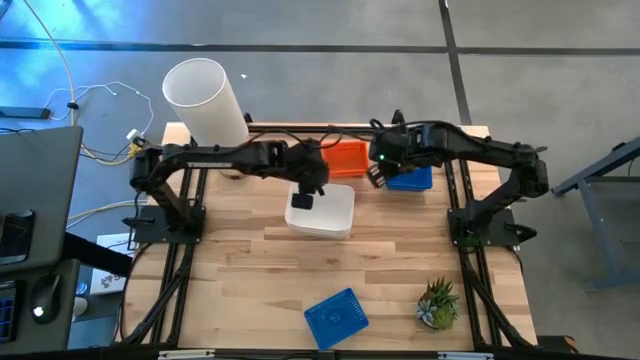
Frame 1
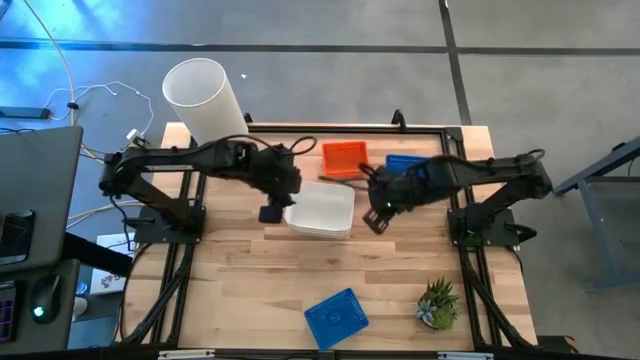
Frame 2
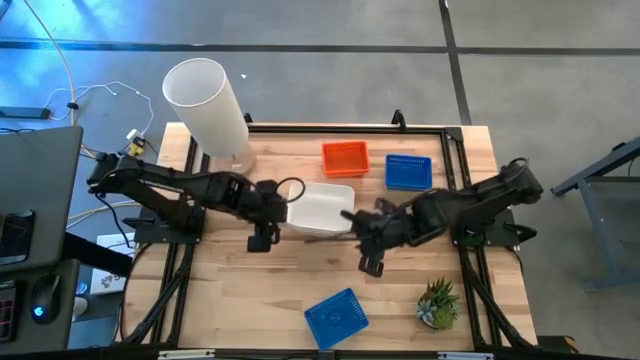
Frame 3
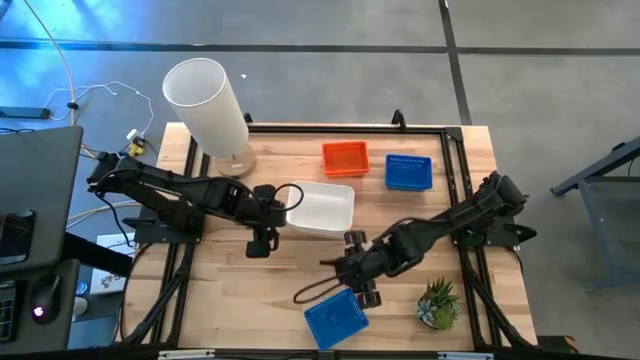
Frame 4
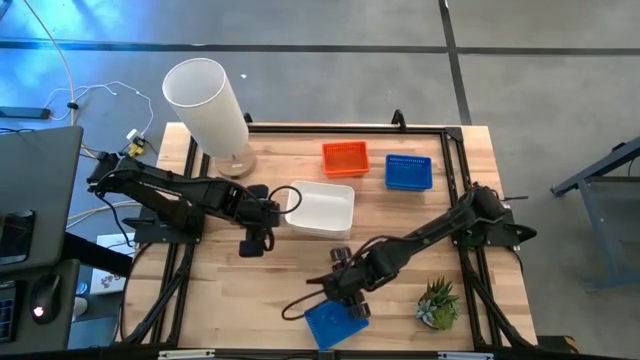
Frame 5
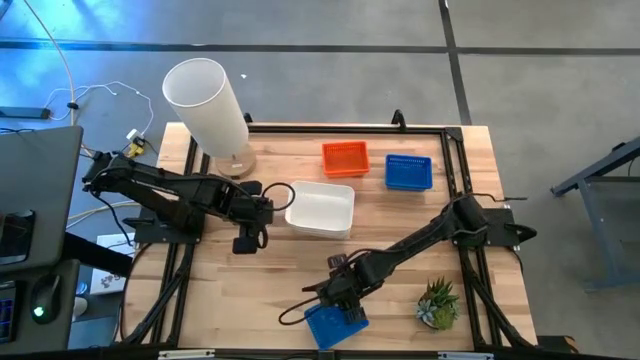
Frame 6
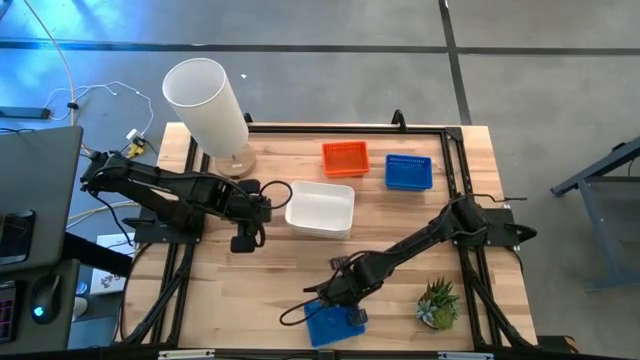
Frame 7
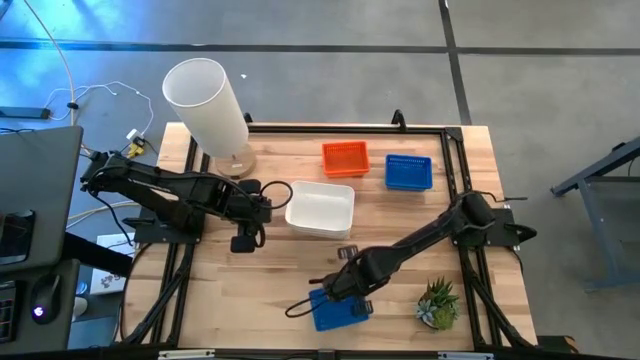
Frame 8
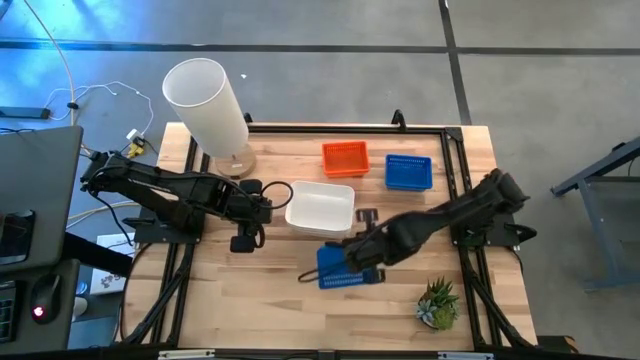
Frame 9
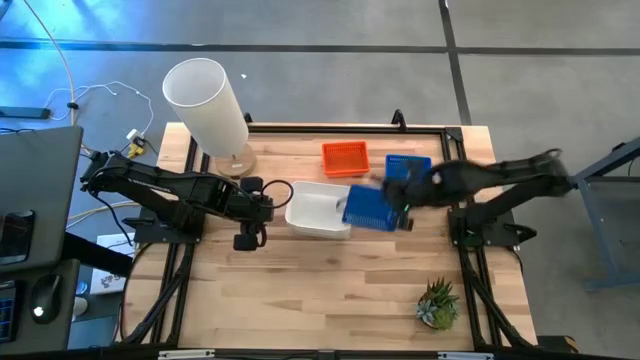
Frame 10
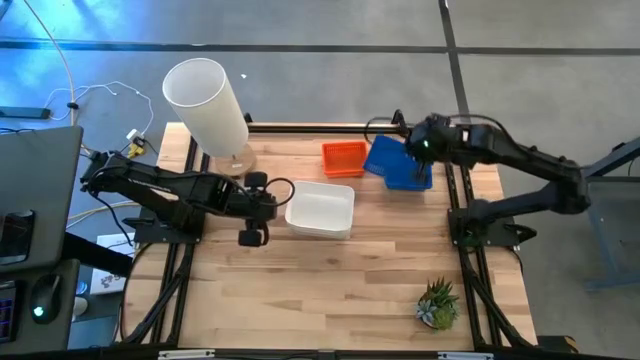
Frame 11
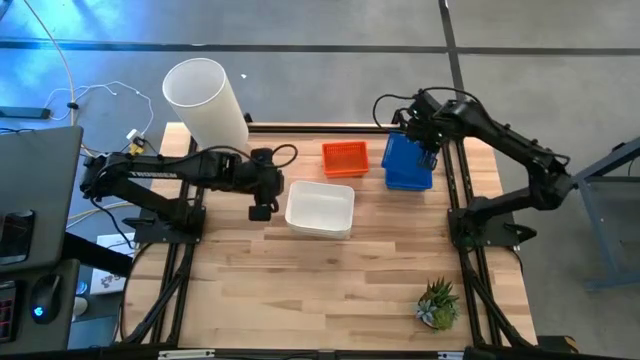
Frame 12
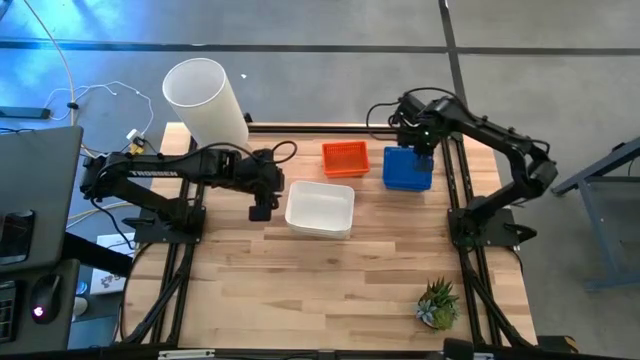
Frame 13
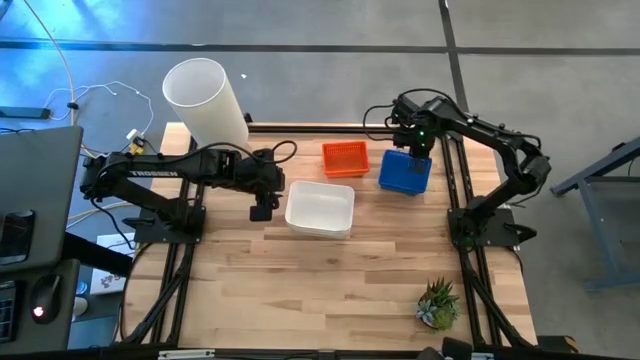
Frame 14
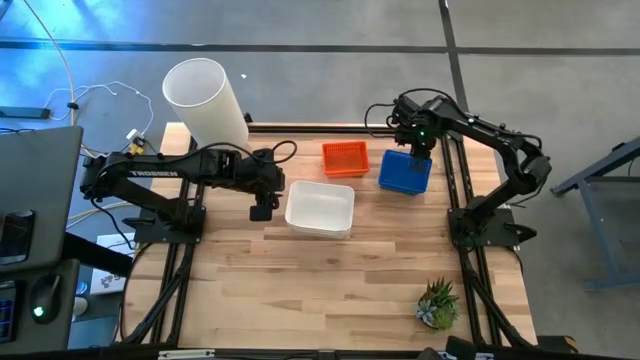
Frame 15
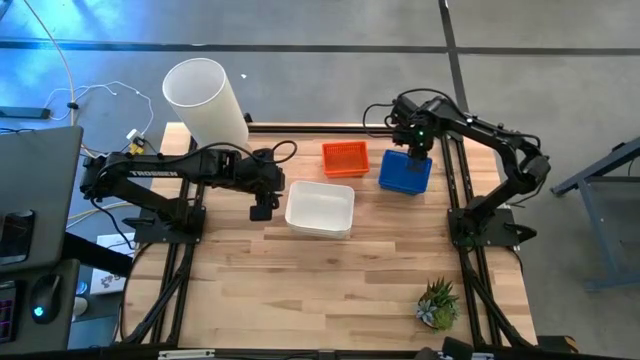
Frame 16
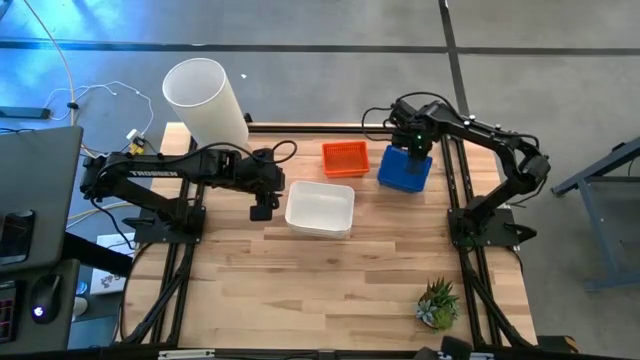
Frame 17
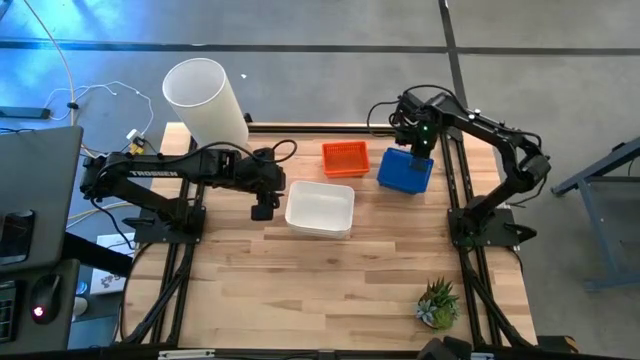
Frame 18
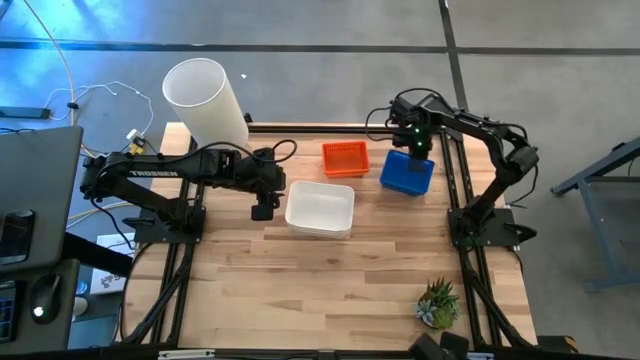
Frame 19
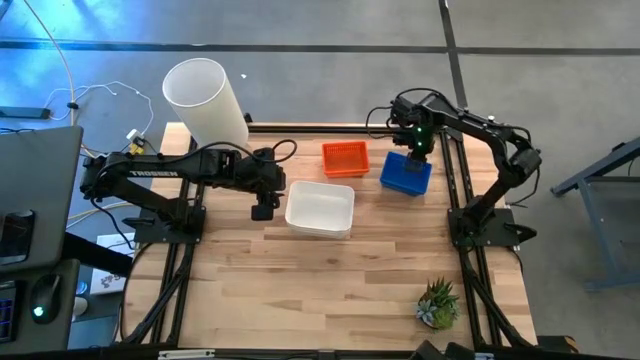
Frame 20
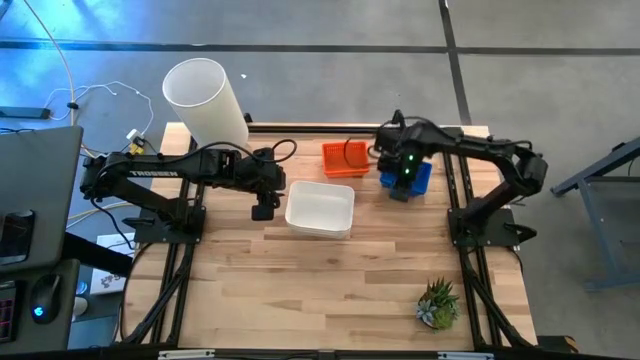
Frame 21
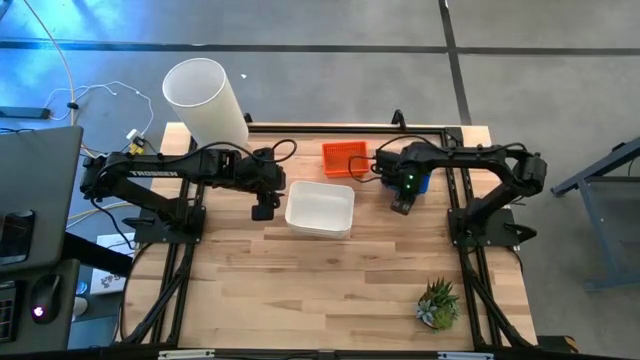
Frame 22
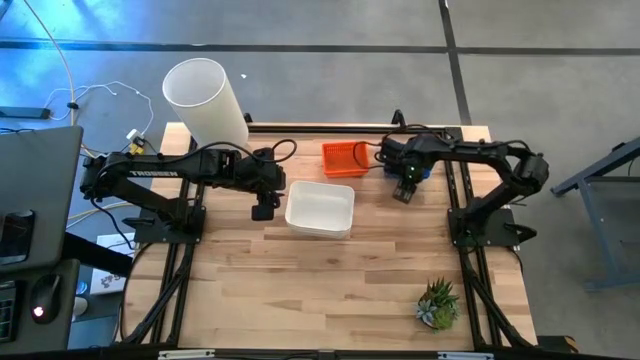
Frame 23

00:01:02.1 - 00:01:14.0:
Stack the bottom blue bin on the top blue bin

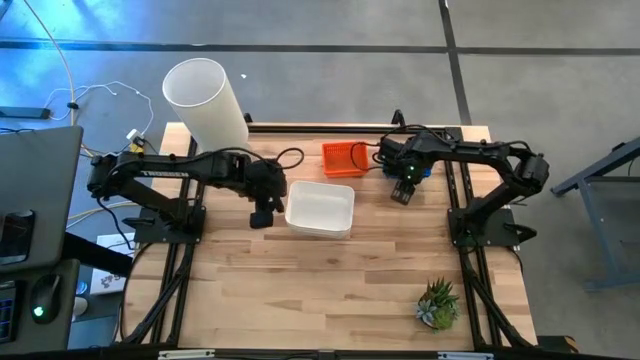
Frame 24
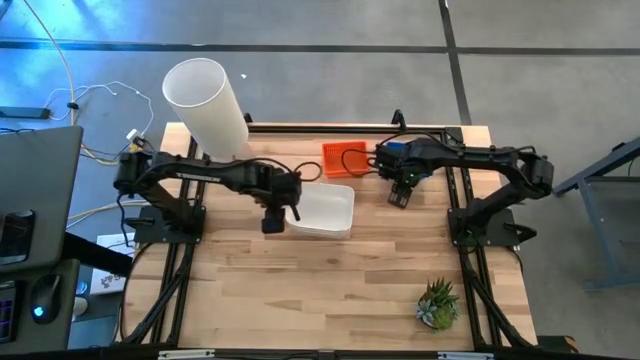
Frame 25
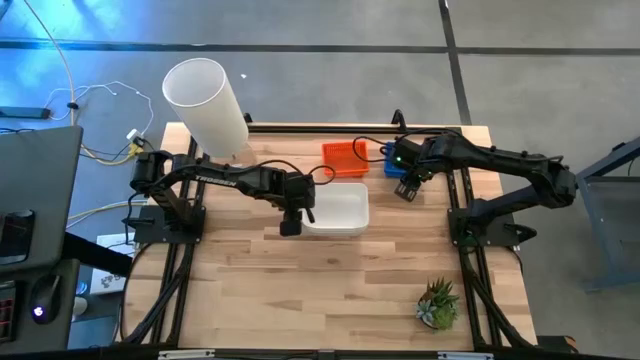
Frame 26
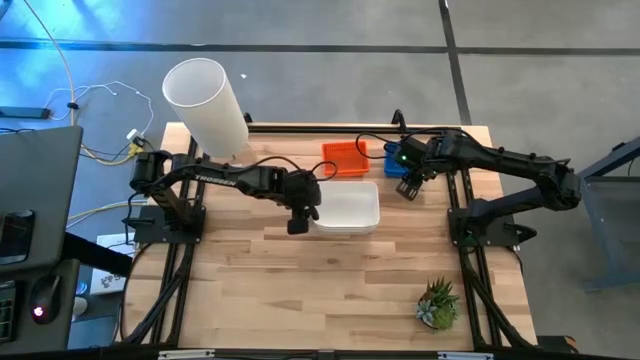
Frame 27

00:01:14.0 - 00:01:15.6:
Adjust the stacked white bins

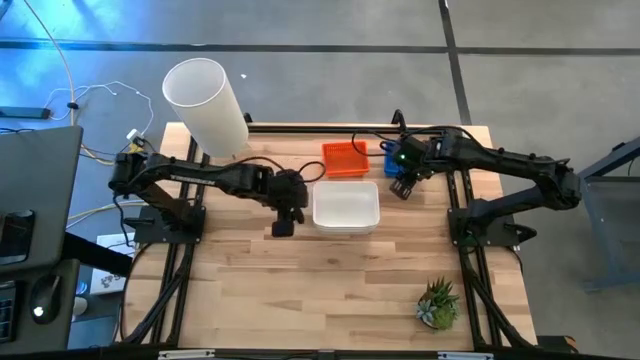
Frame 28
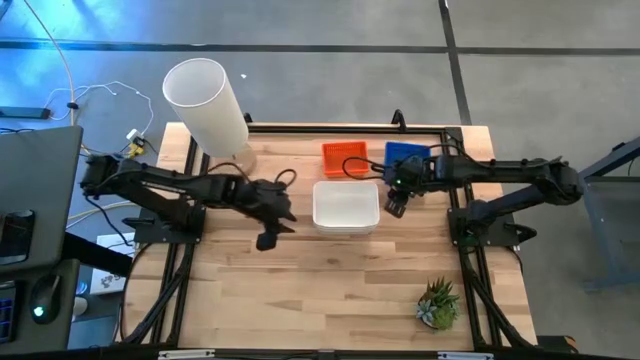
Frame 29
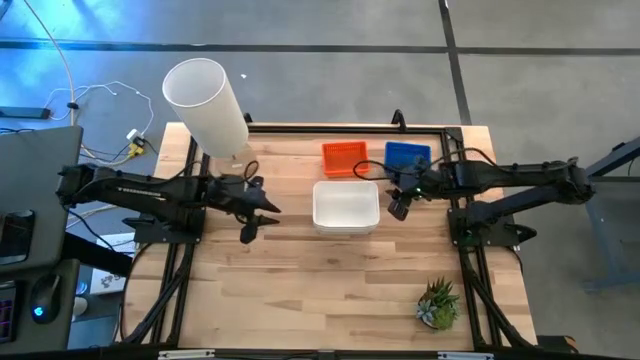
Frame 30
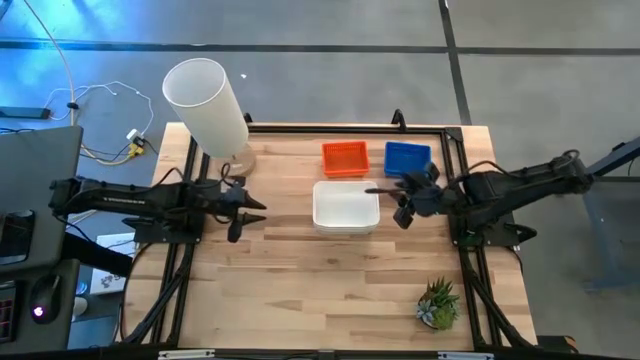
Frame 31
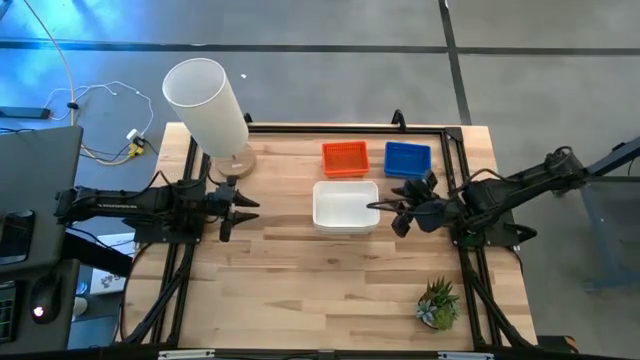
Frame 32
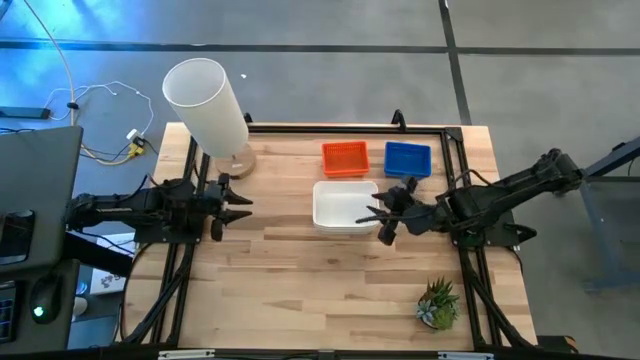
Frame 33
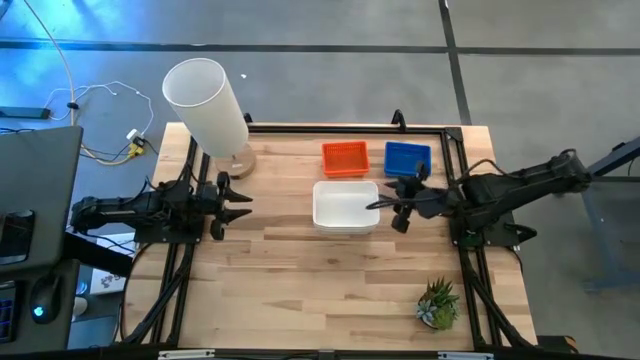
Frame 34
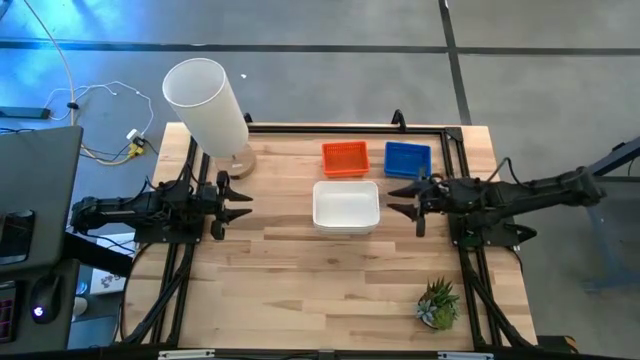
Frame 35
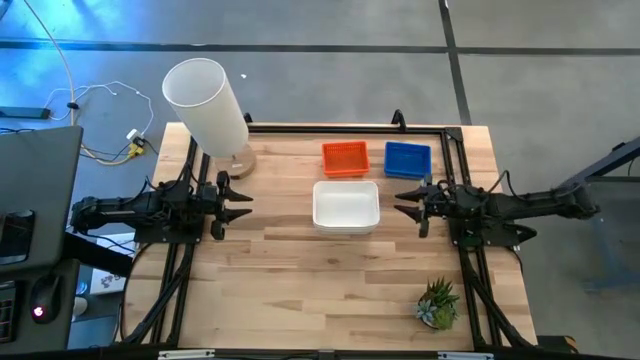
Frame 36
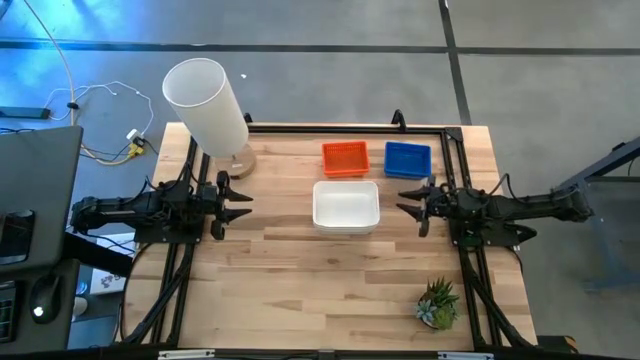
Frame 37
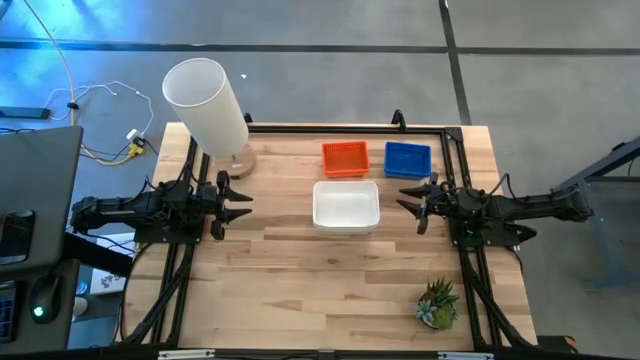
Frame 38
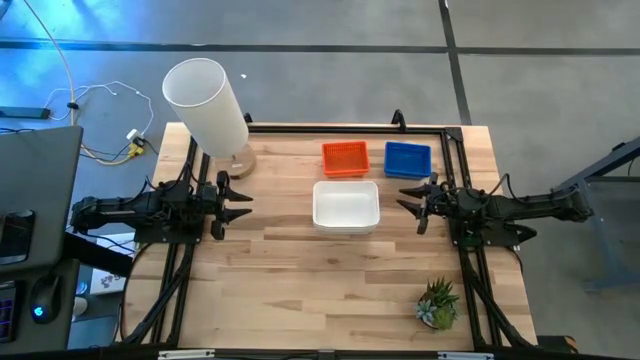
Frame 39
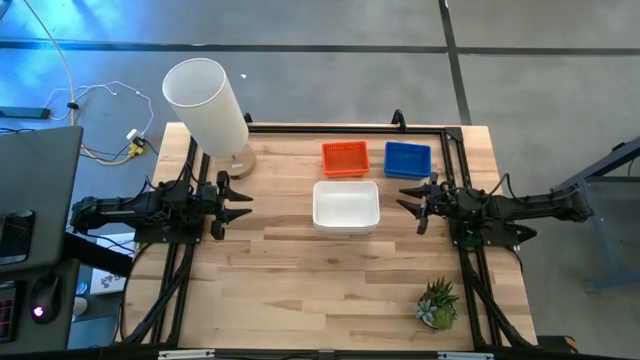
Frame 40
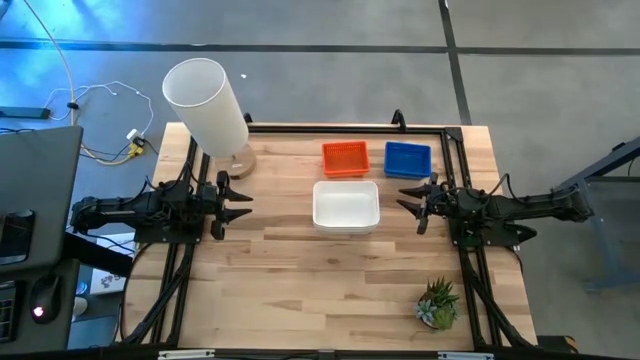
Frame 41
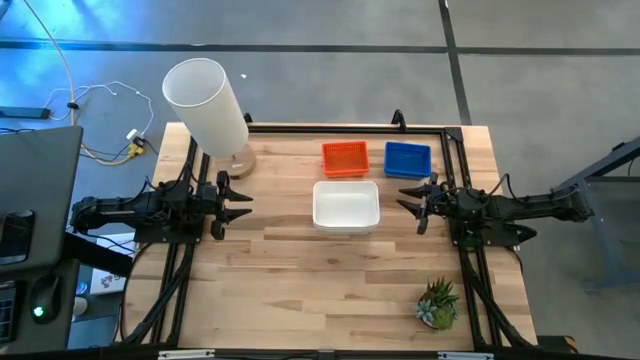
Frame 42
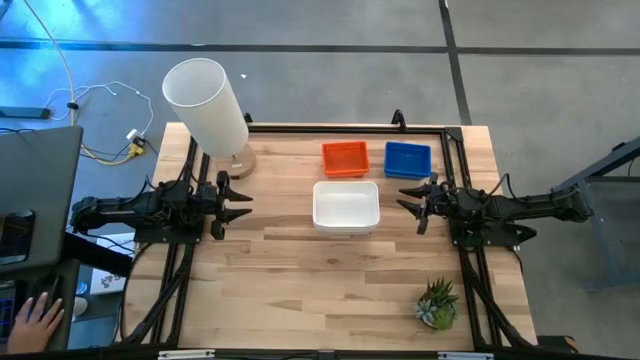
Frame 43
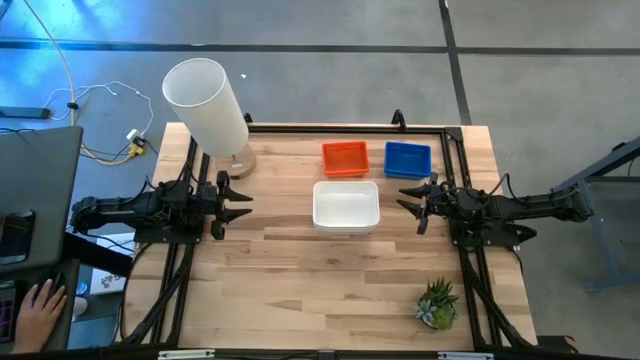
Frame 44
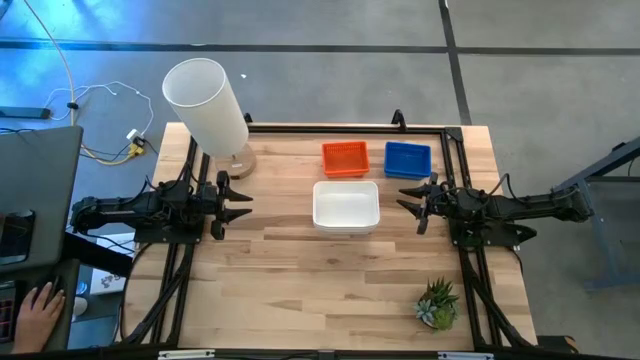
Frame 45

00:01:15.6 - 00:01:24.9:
Return to Home Position
